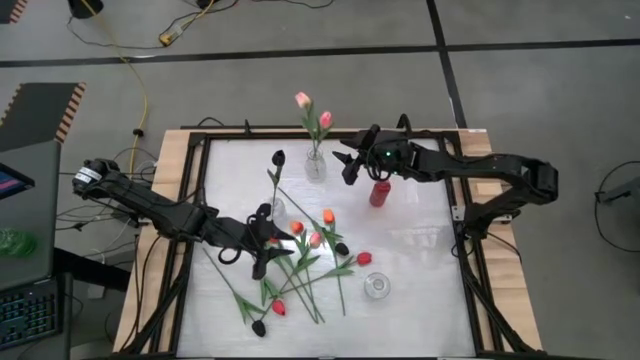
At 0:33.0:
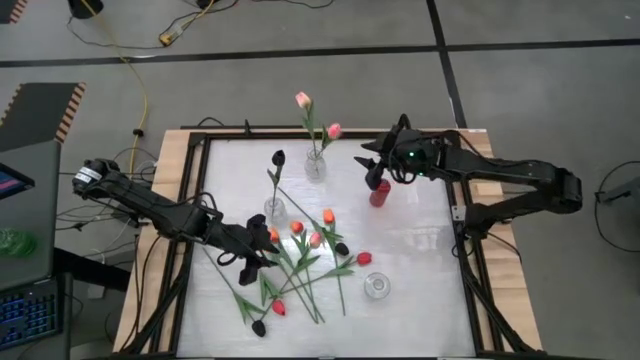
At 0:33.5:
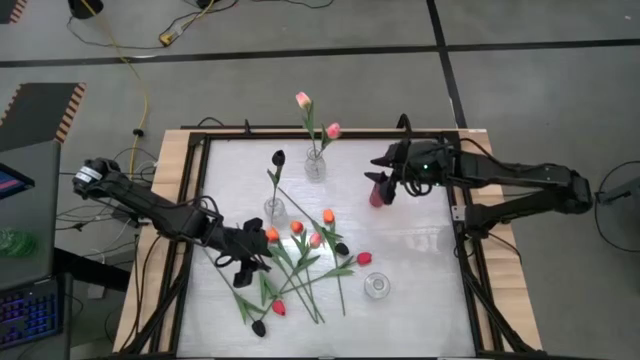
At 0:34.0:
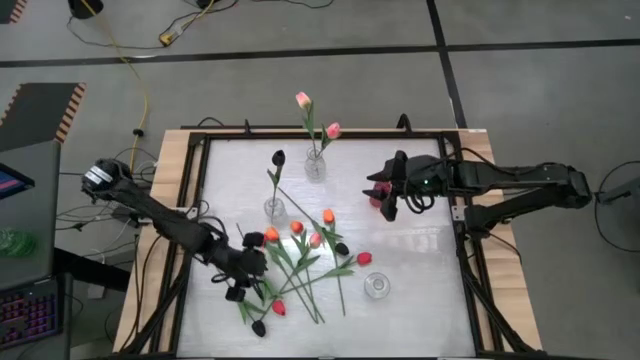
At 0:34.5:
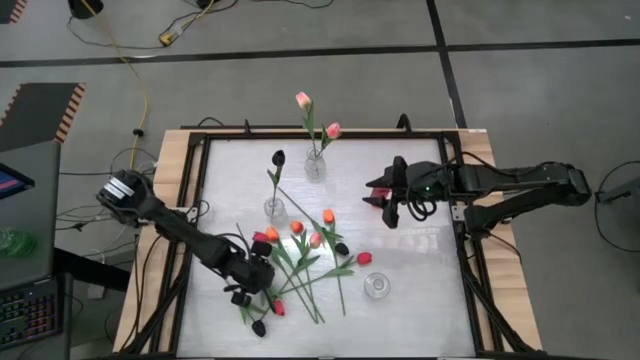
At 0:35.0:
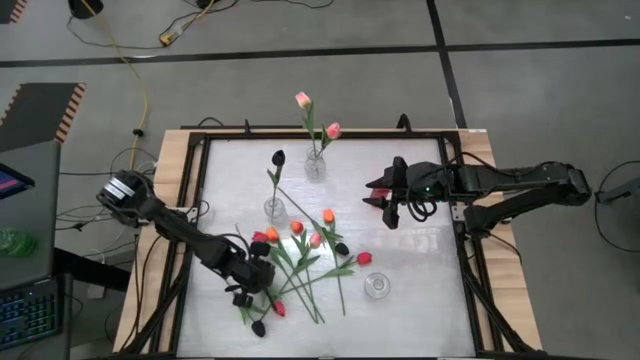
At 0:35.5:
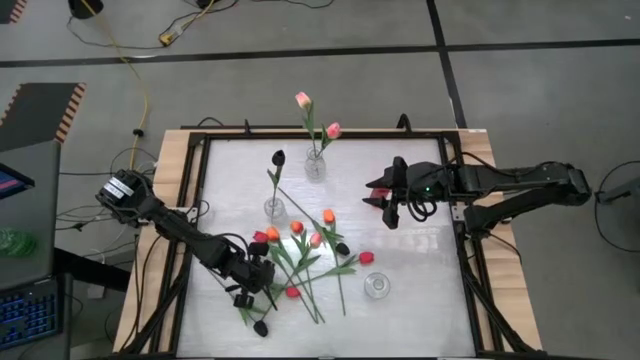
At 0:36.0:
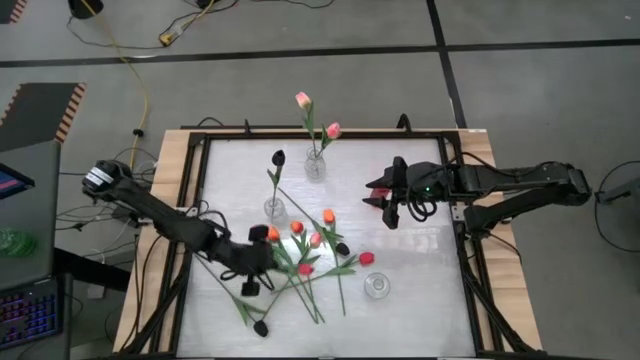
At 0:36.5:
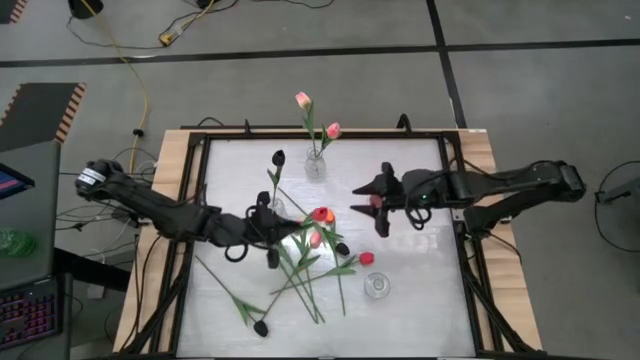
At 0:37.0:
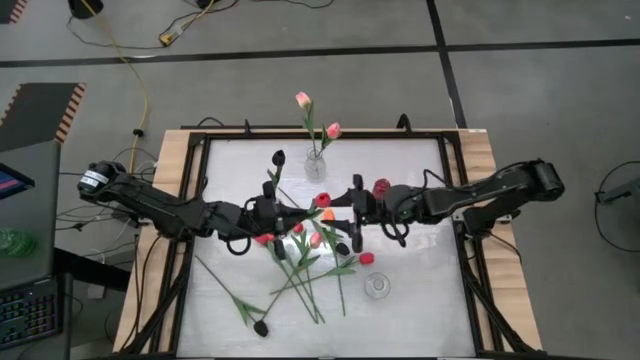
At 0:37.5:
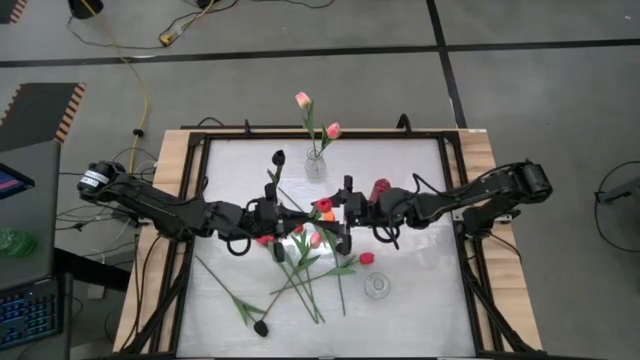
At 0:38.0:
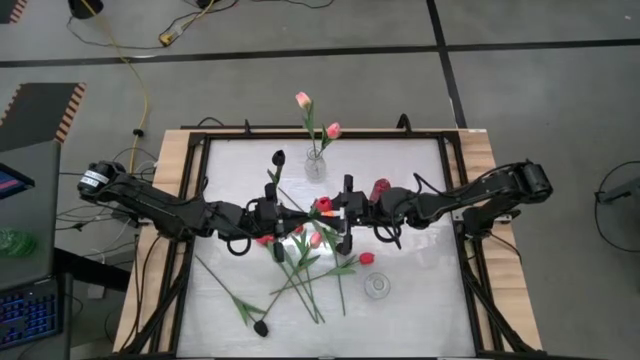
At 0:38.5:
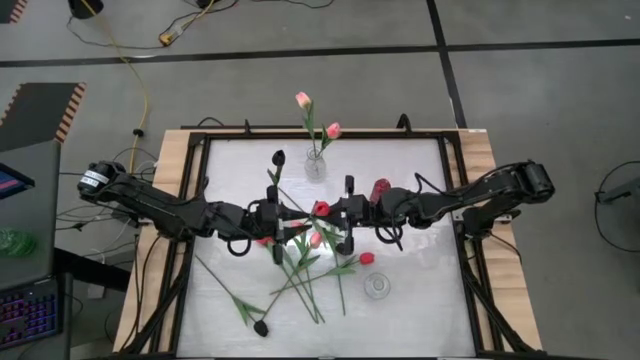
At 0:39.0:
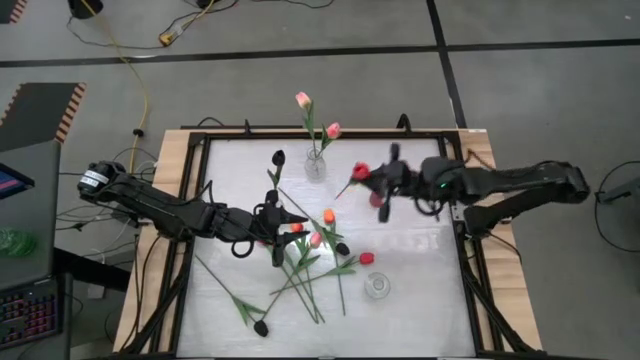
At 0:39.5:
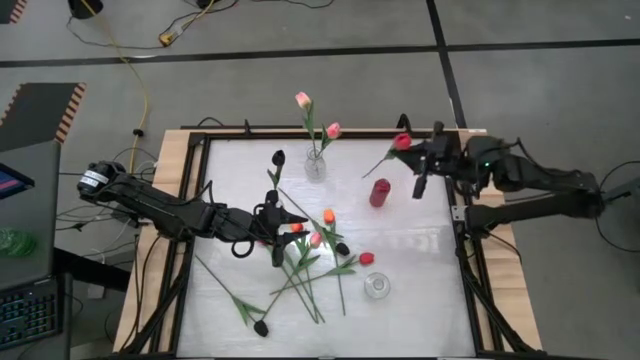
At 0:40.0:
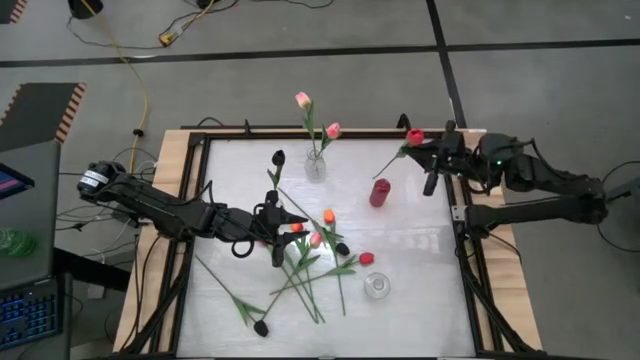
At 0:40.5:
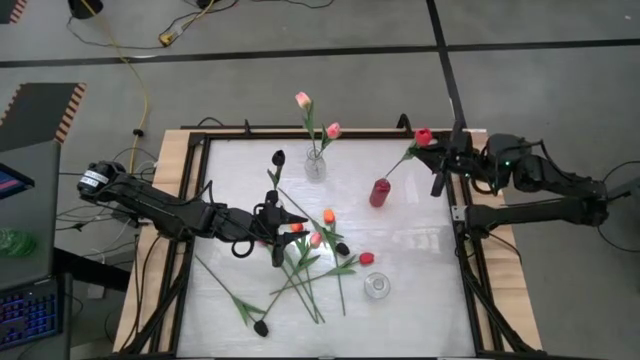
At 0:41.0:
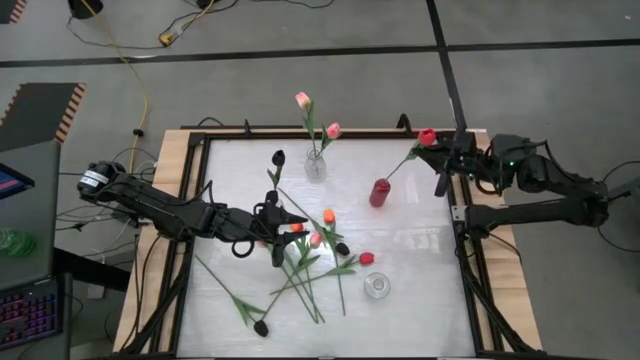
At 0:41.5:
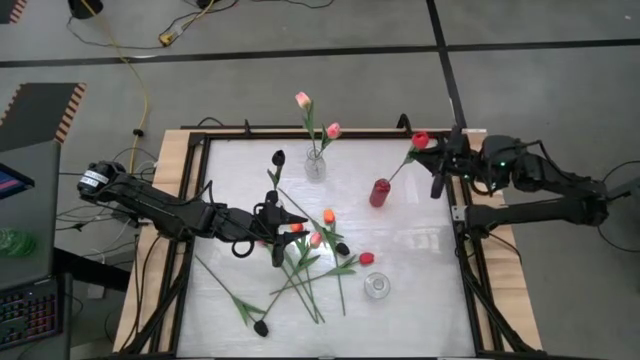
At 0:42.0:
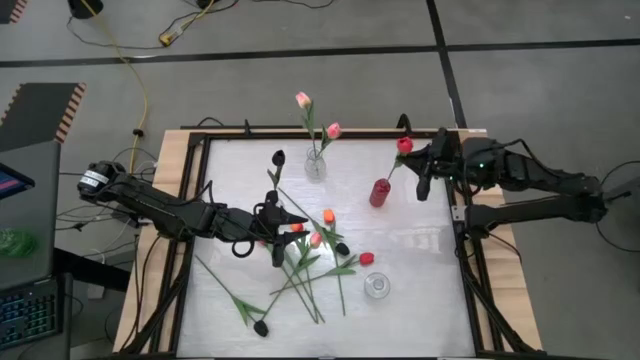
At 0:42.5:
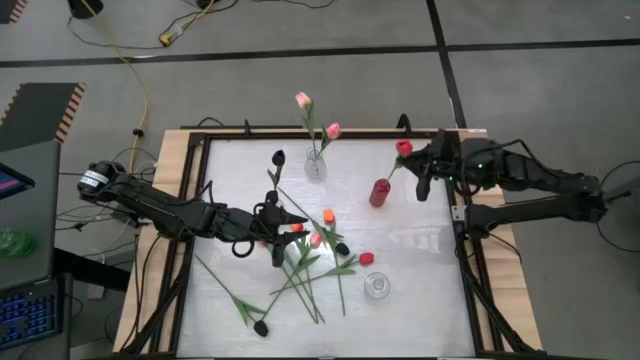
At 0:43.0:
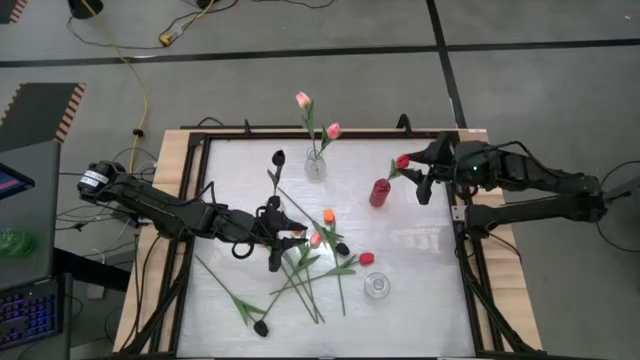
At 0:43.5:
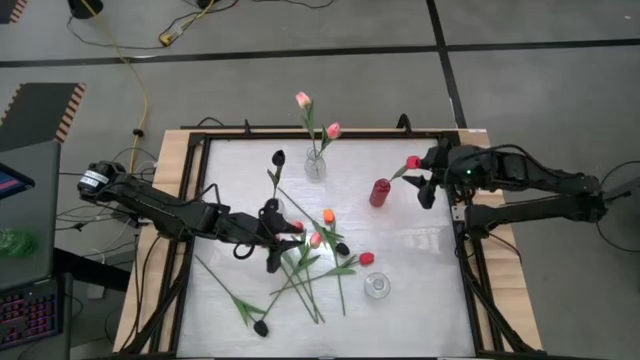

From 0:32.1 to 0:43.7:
Task: Sort flowers into vase by color
Put the red tulip into the red vase

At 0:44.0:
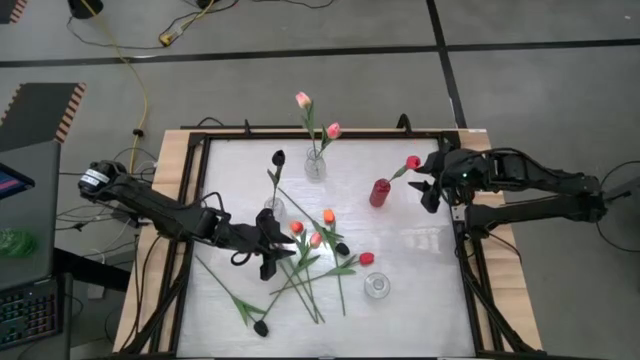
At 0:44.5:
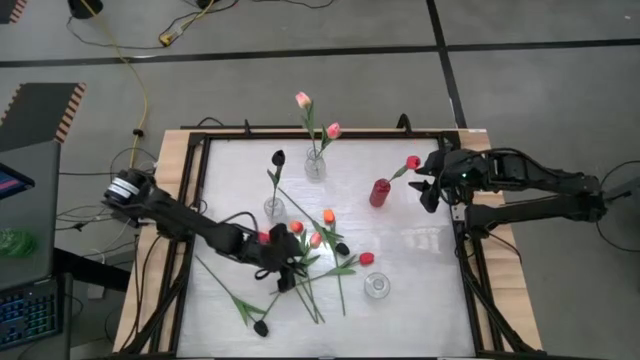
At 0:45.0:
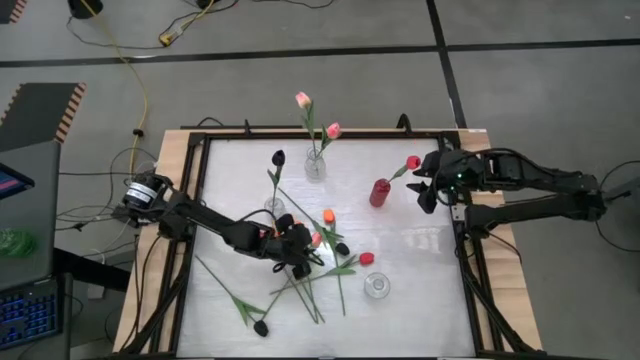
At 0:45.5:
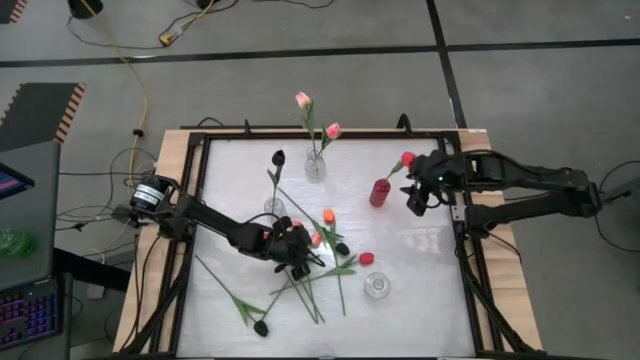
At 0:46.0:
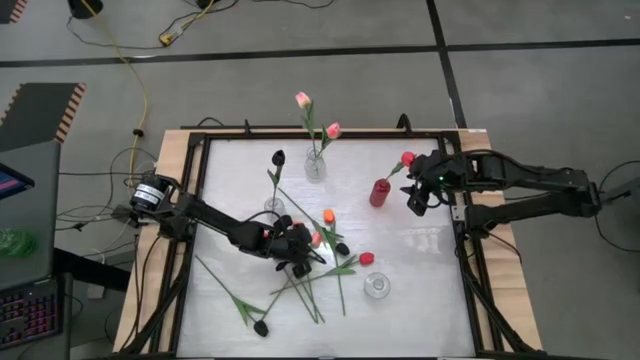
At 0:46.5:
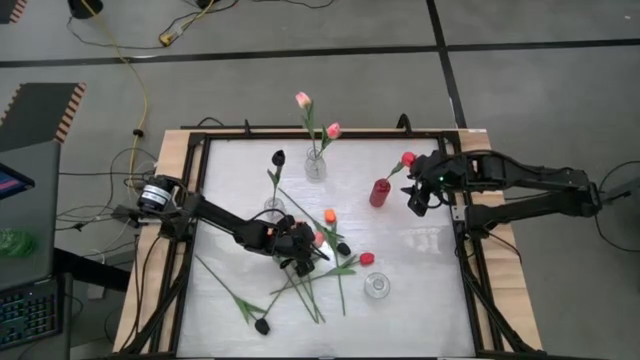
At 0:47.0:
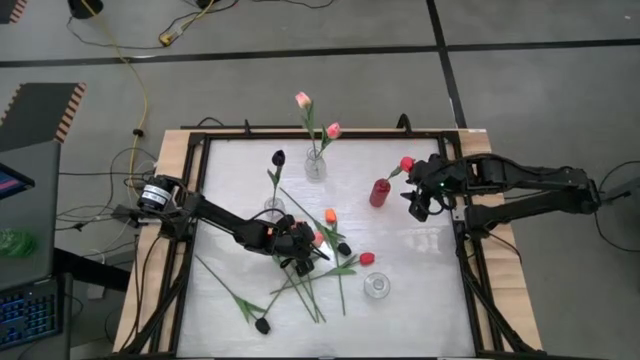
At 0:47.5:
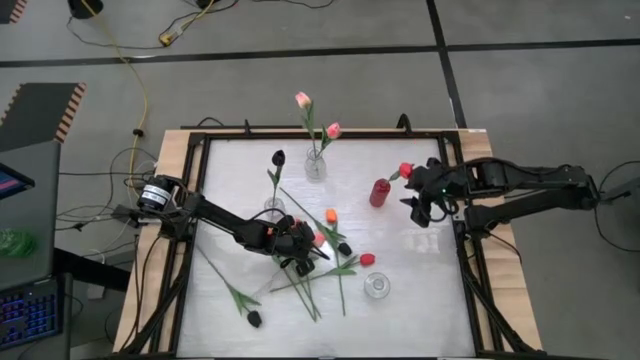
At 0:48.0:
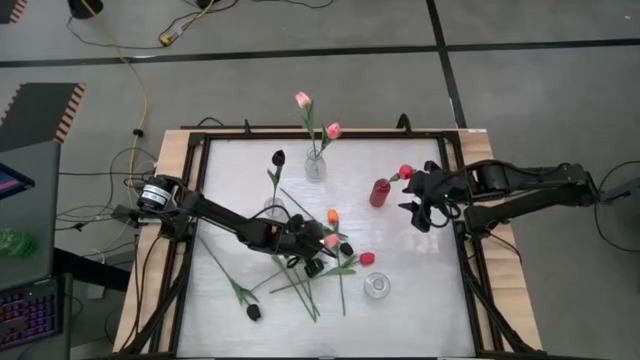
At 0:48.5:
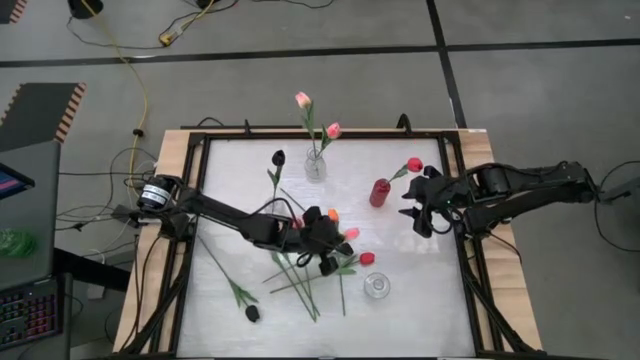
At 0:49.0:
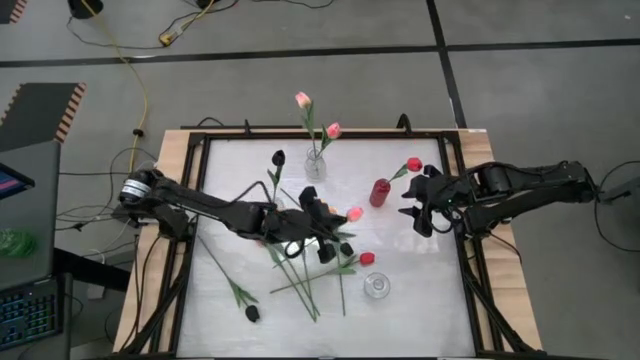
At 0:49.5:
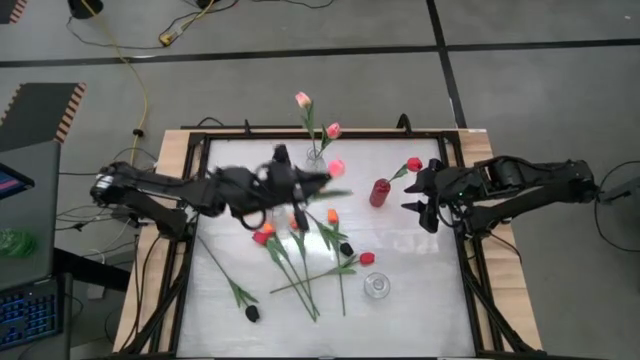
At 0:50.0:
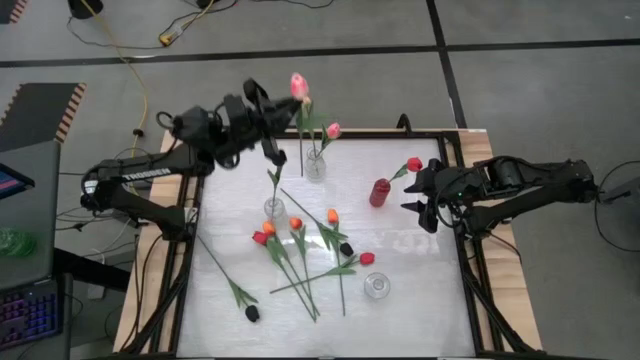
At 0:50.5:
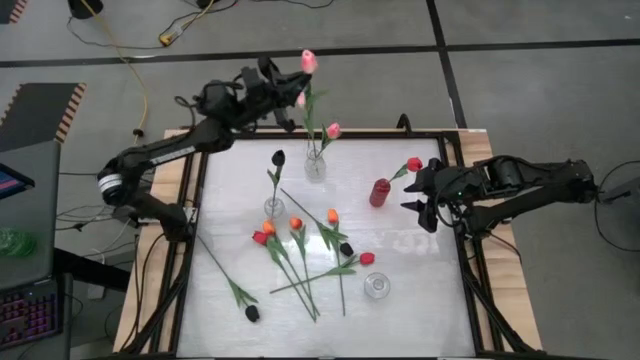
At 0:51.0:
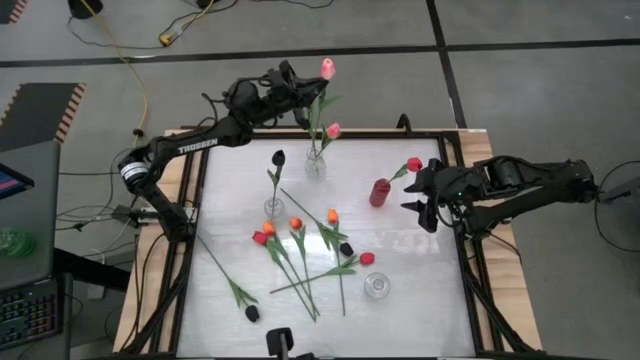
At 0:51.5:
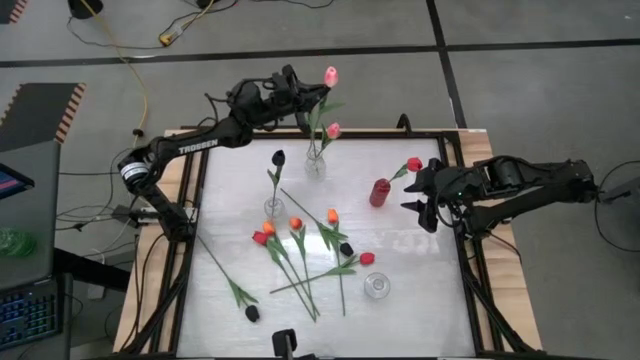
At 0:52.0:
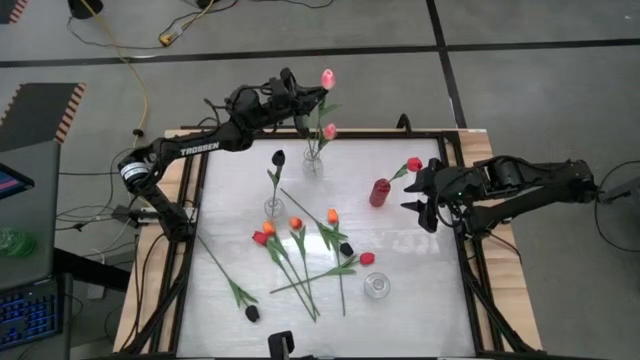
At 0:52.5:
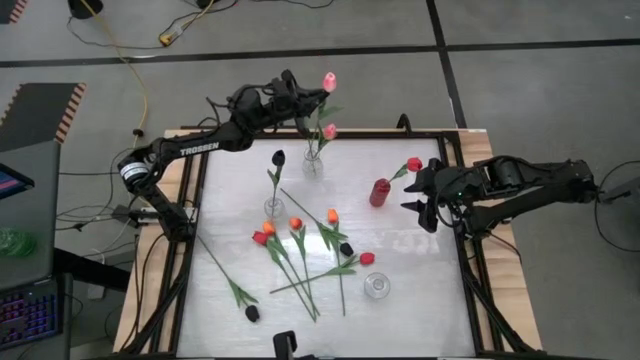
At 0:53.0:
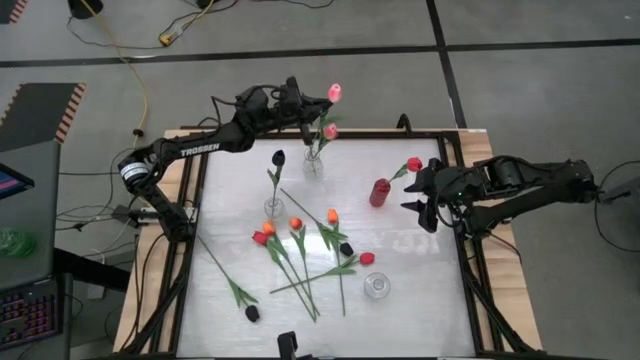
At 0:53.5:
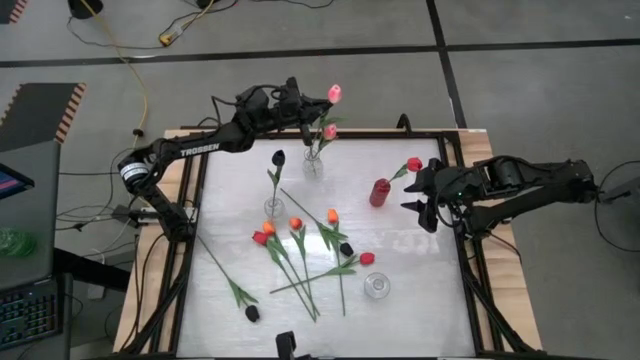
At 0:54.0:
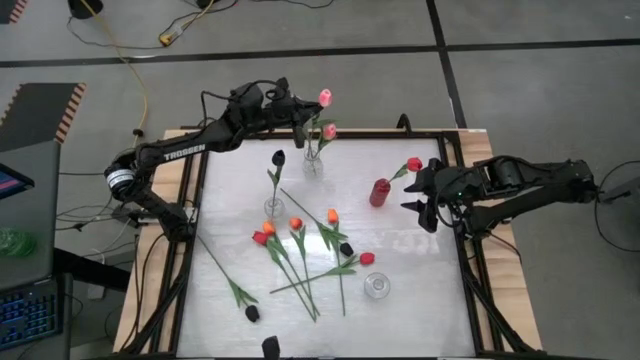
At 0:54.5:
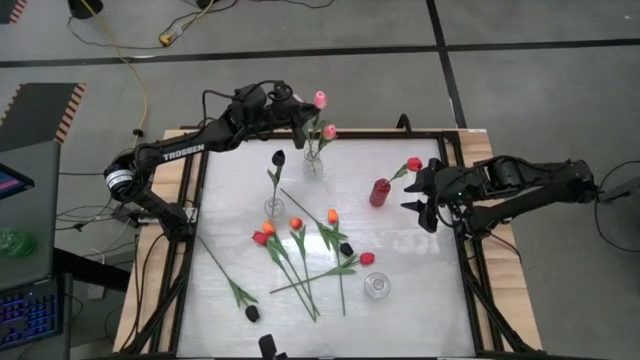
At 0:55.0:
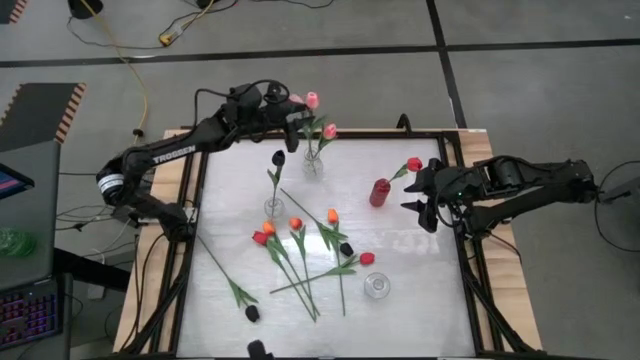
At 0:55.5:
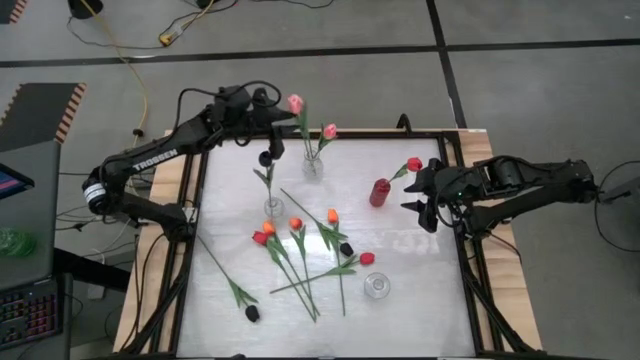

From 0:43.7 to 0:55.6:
Put the pink tulip into the top transparent vase
